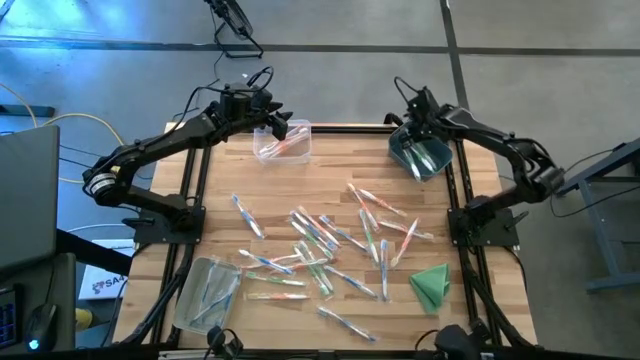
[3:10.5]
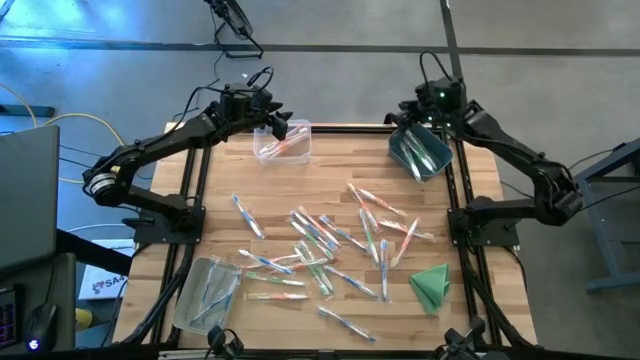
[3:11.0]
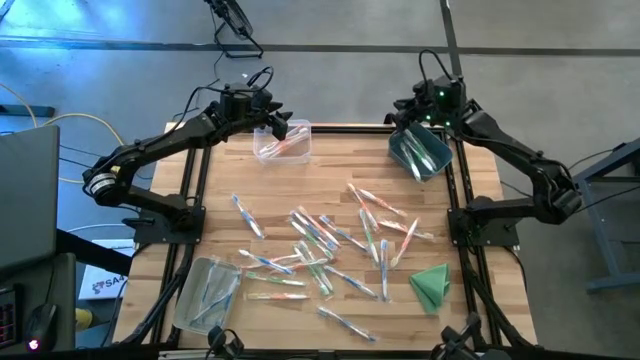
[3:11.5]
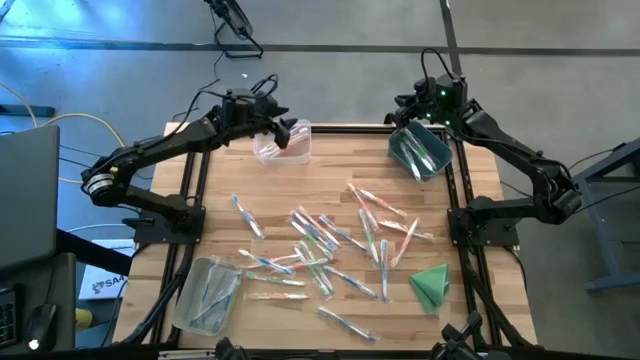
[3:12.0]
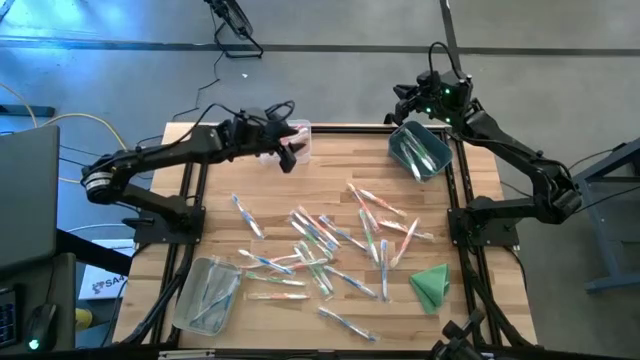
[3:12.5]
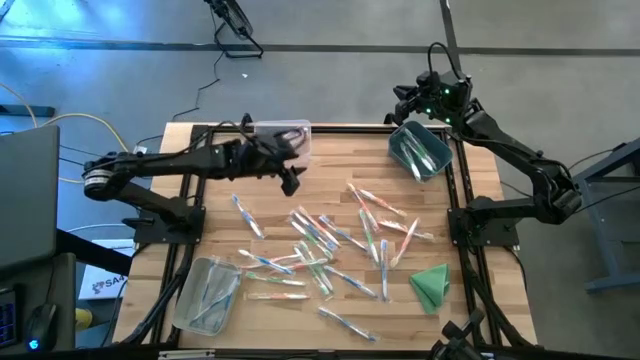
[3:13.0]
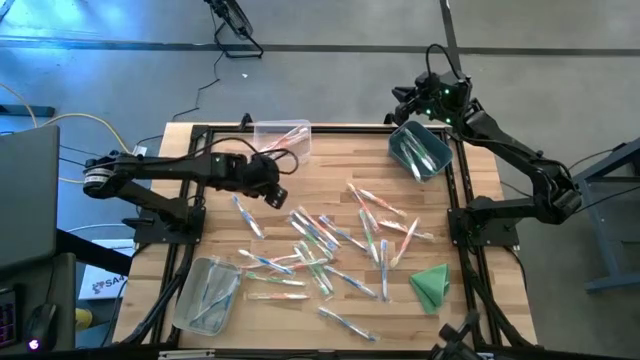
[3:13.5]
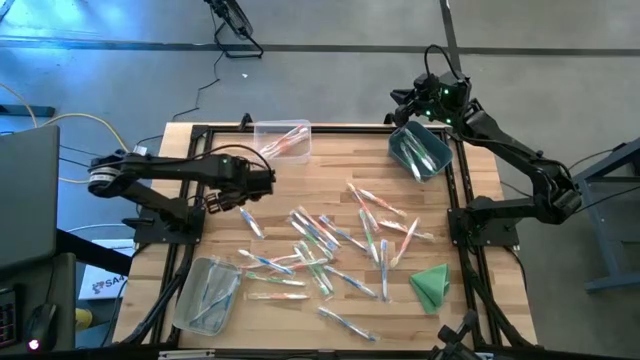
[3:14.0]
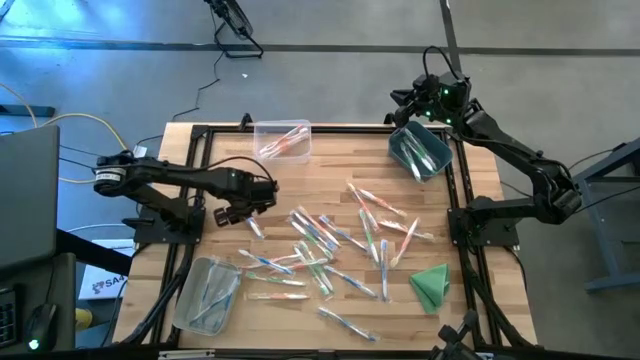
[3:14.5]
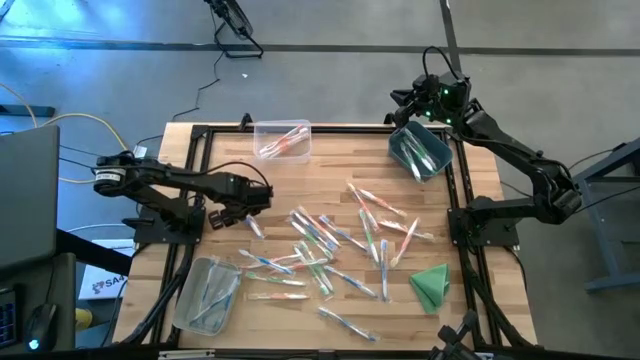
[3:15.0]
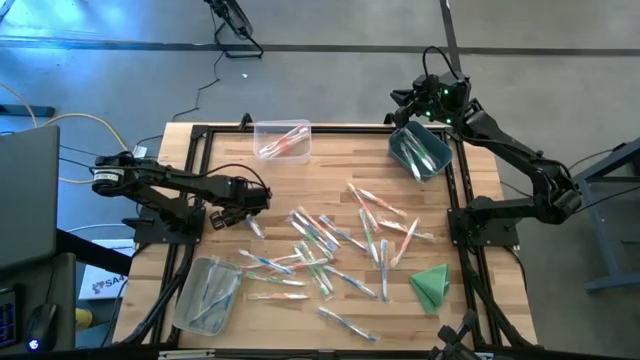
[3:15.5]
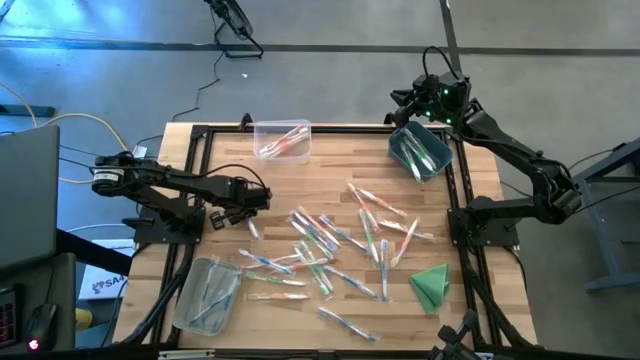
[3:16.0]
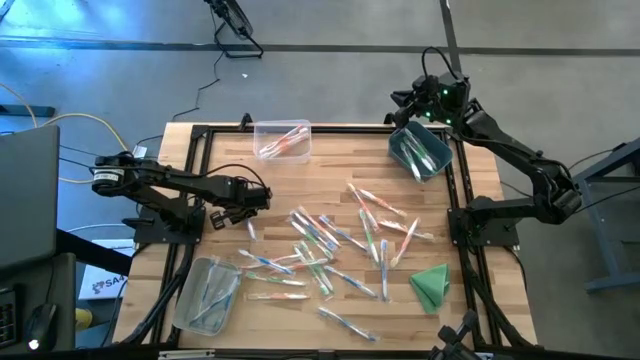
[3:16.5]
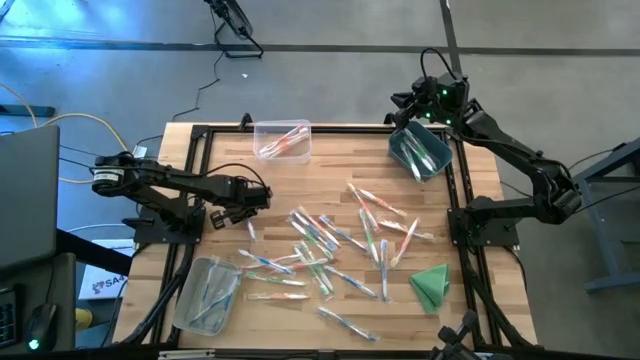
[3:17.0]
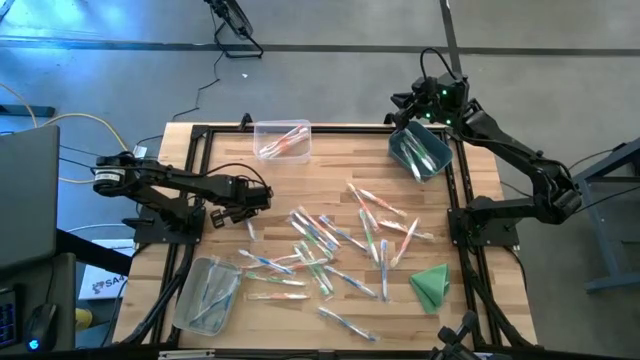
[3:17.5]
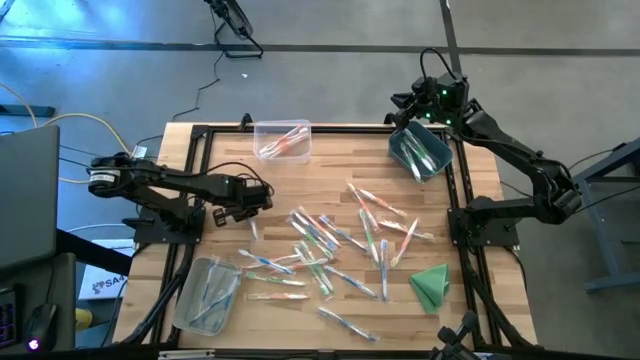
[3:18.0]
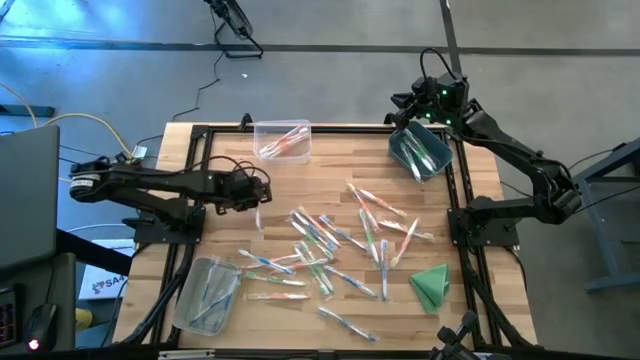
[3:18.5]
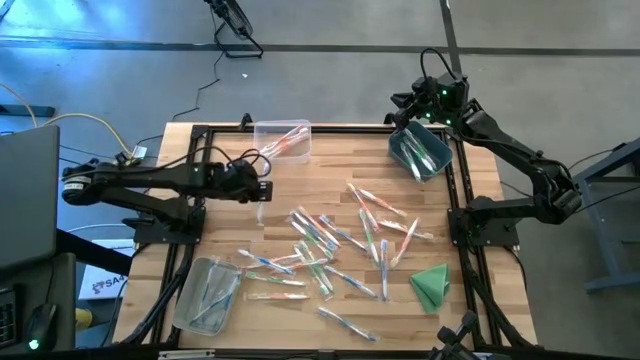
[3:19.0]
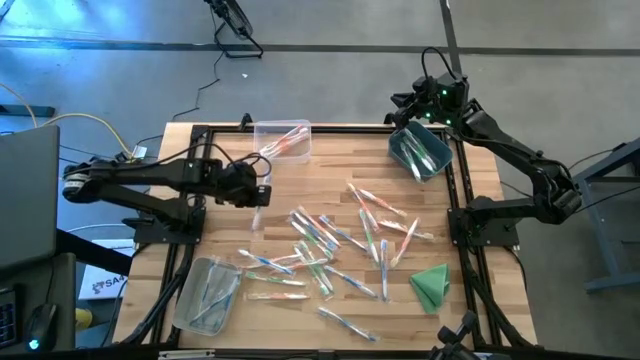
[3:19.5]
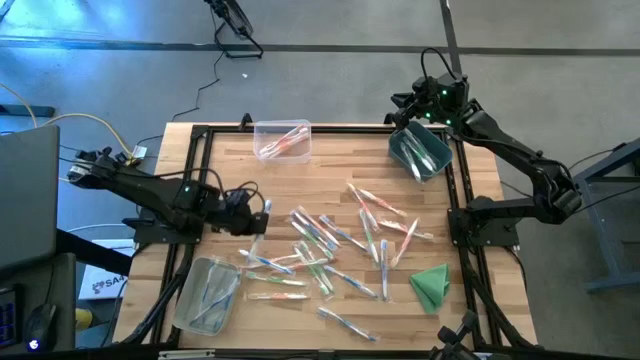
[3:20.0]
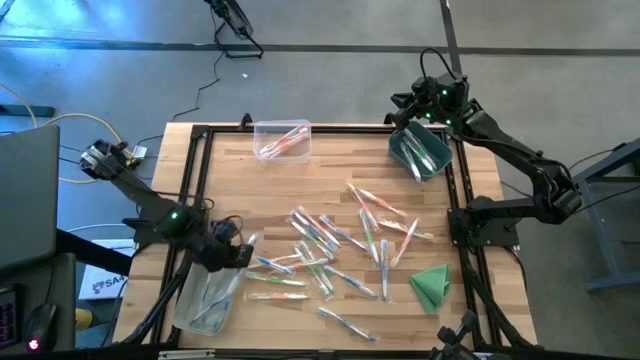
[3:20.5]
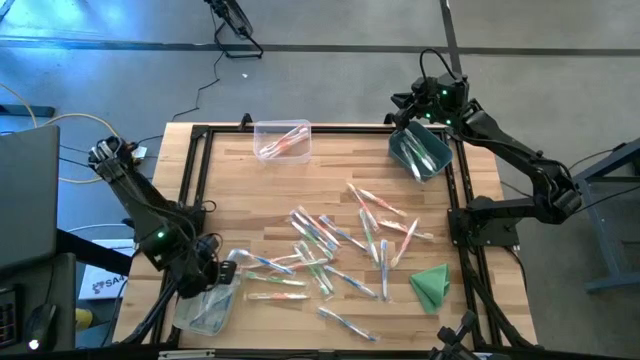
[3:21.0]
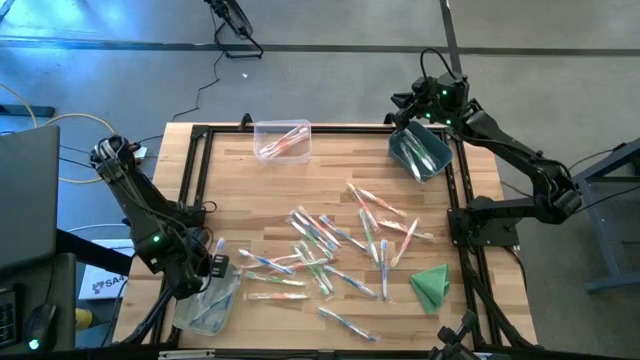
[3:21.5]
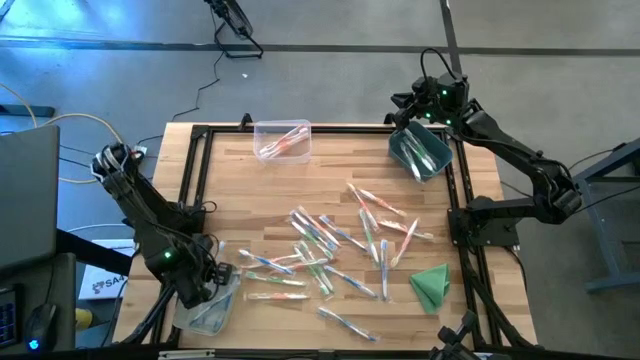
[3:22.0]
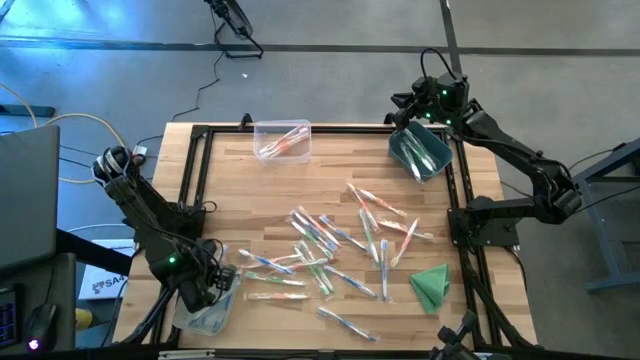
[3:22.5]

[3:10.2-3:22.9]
Task: Pick & Place Toothbrushes
Put the blue toothbrush into the gray bin
